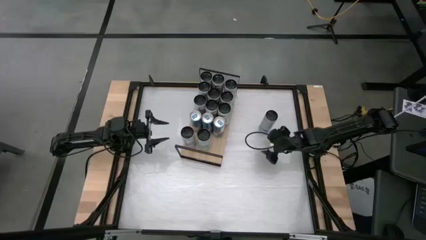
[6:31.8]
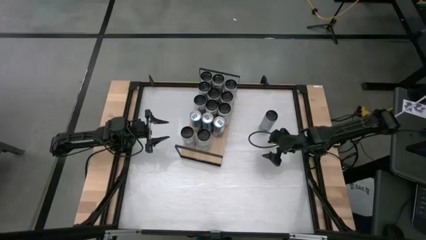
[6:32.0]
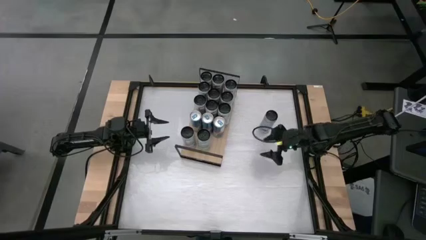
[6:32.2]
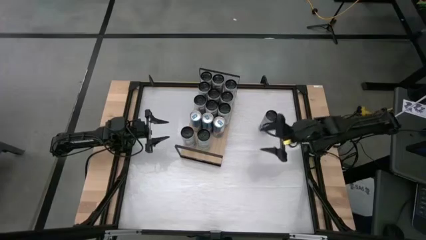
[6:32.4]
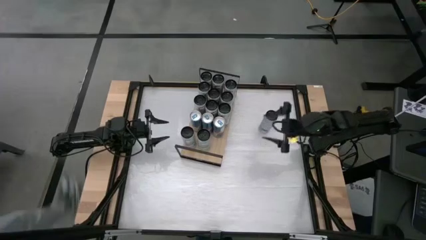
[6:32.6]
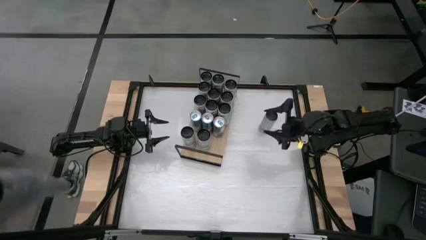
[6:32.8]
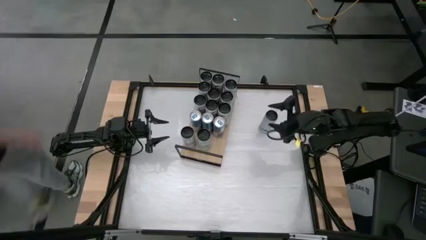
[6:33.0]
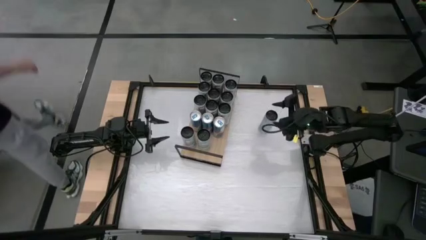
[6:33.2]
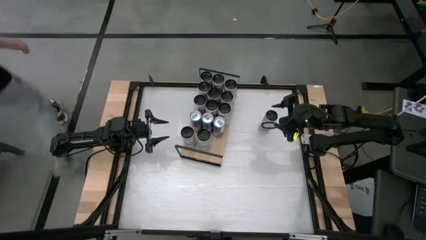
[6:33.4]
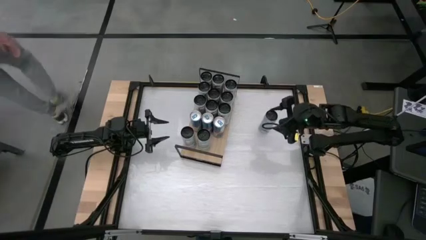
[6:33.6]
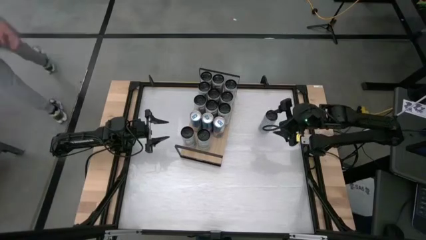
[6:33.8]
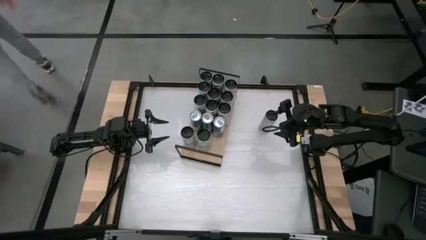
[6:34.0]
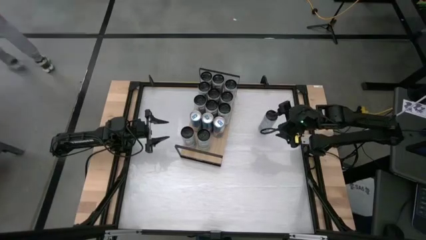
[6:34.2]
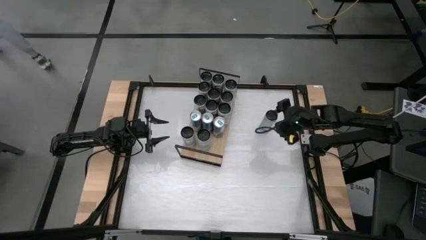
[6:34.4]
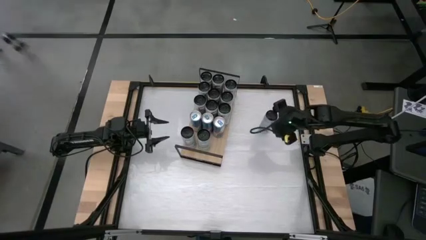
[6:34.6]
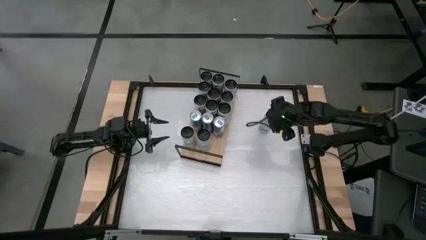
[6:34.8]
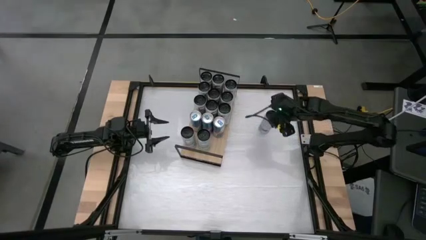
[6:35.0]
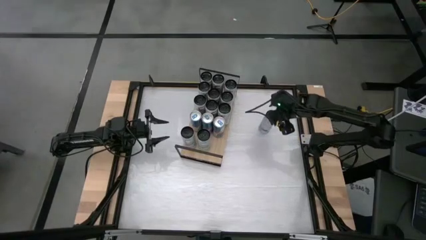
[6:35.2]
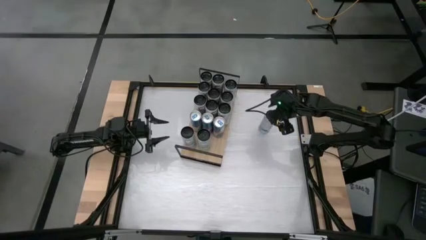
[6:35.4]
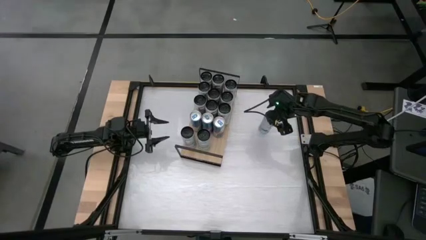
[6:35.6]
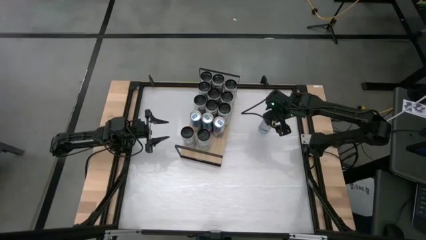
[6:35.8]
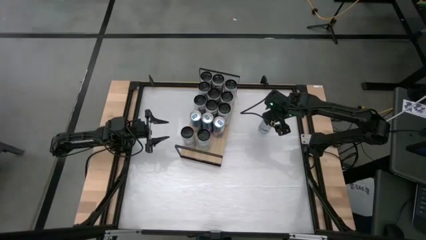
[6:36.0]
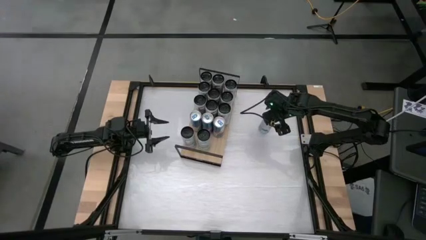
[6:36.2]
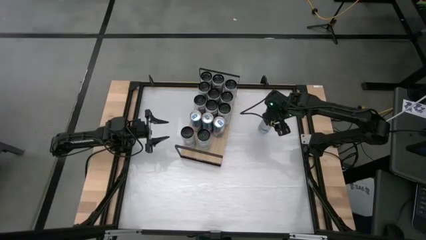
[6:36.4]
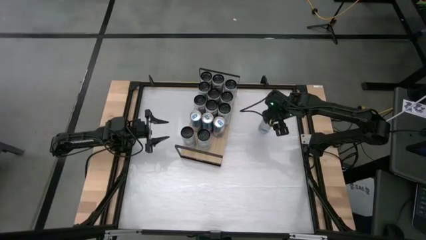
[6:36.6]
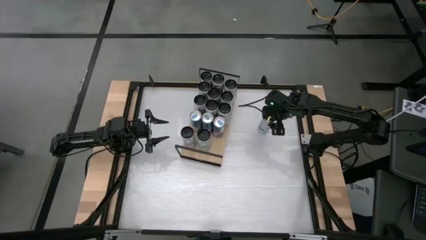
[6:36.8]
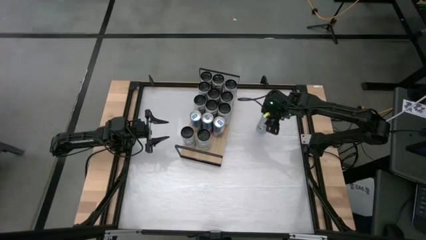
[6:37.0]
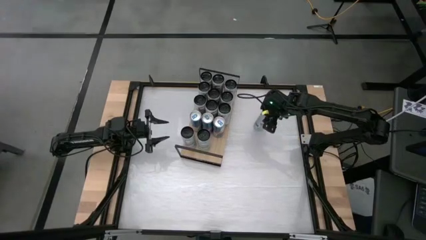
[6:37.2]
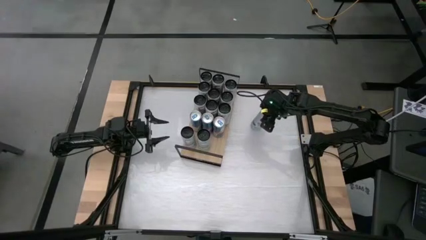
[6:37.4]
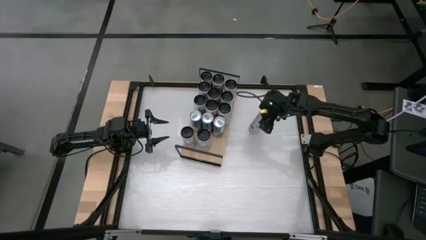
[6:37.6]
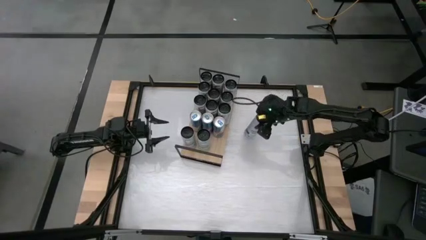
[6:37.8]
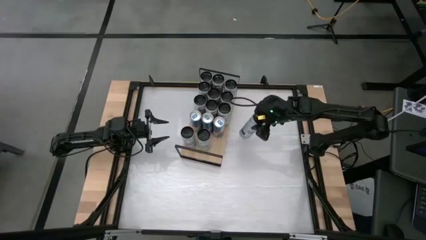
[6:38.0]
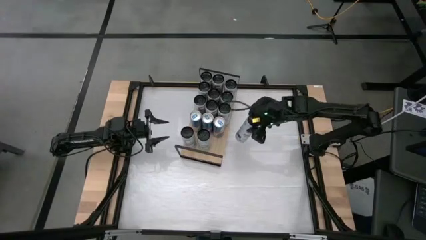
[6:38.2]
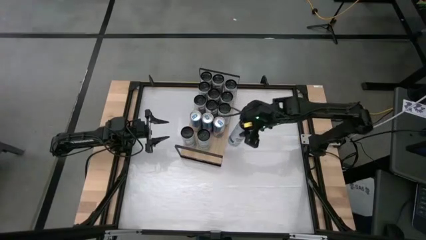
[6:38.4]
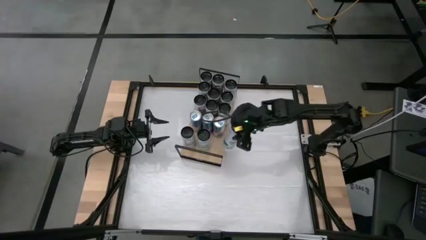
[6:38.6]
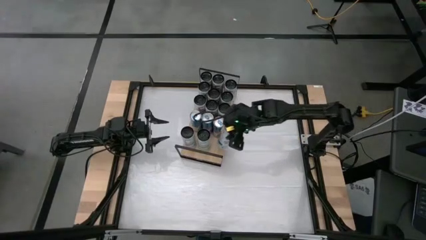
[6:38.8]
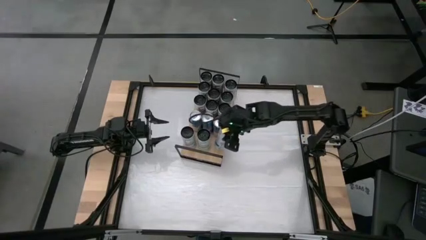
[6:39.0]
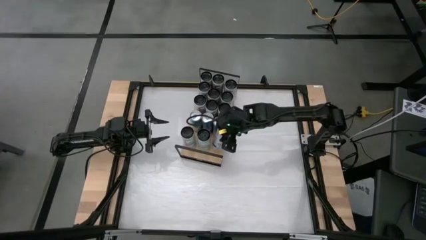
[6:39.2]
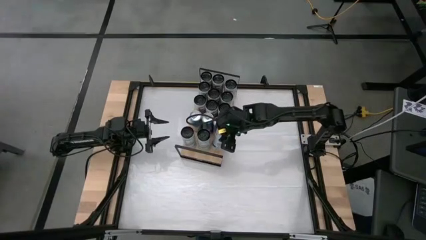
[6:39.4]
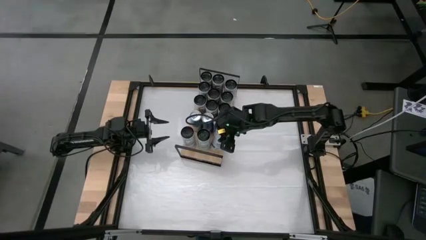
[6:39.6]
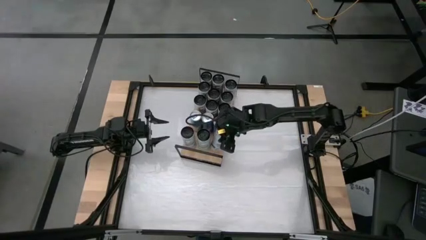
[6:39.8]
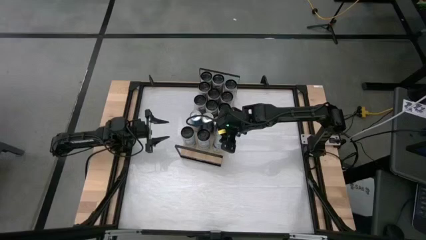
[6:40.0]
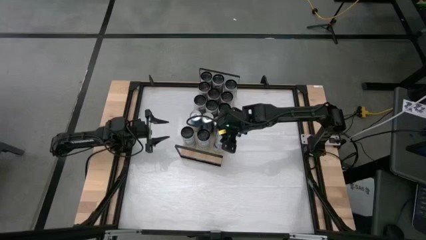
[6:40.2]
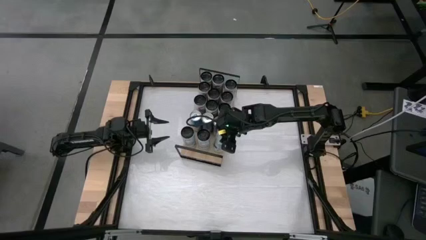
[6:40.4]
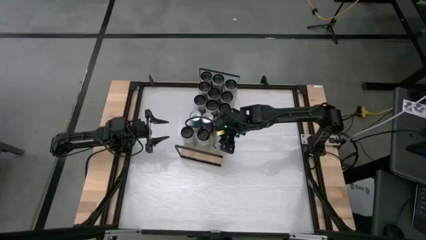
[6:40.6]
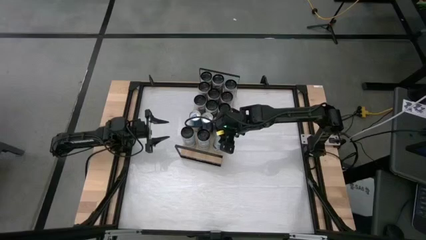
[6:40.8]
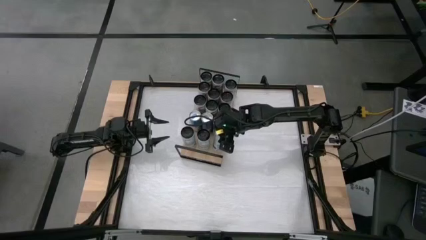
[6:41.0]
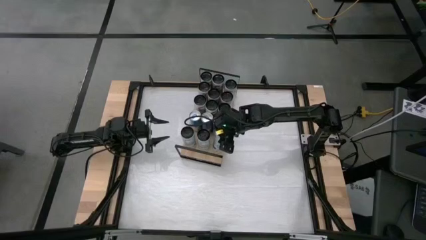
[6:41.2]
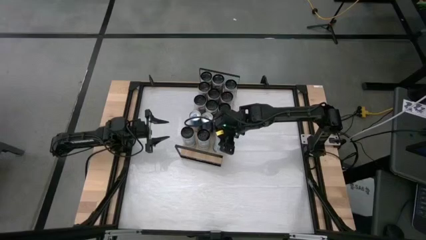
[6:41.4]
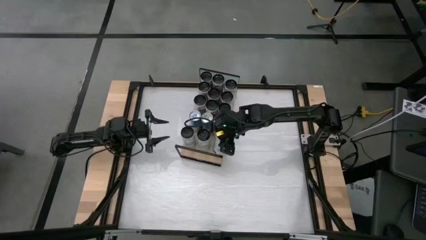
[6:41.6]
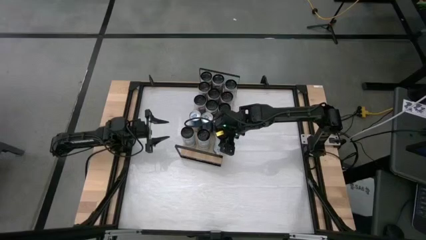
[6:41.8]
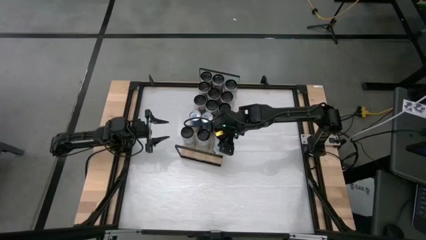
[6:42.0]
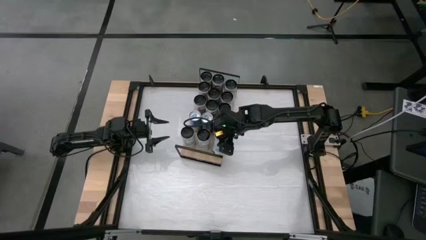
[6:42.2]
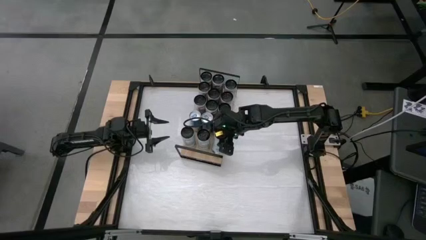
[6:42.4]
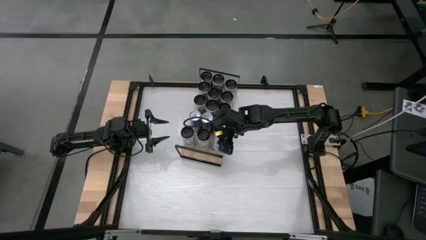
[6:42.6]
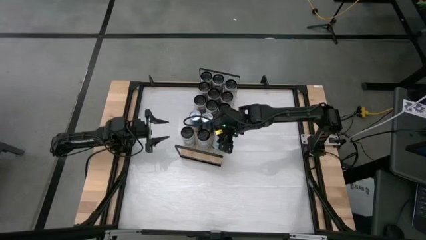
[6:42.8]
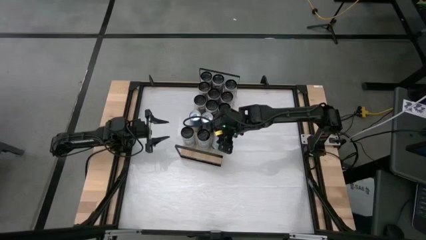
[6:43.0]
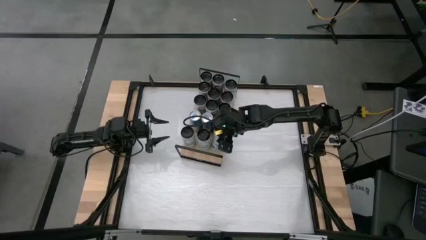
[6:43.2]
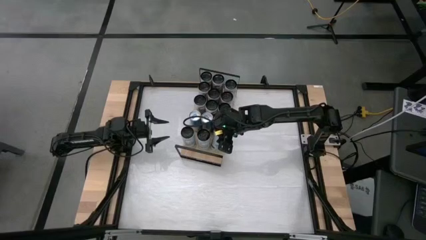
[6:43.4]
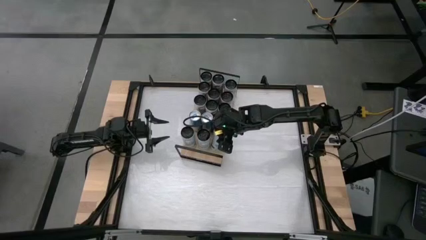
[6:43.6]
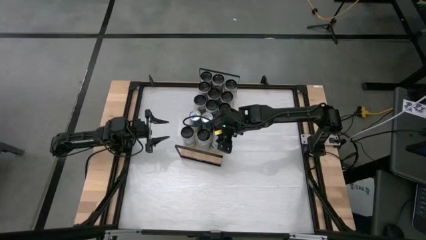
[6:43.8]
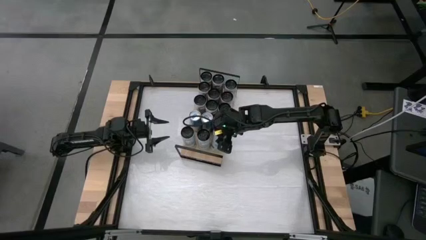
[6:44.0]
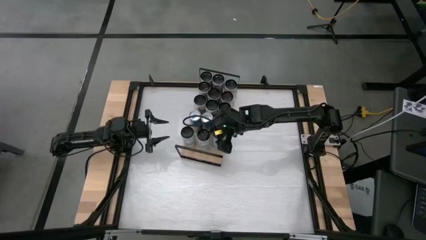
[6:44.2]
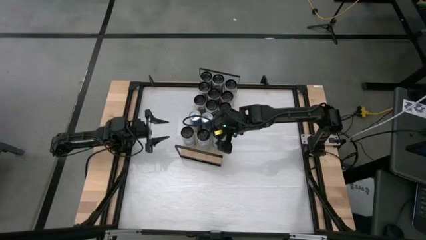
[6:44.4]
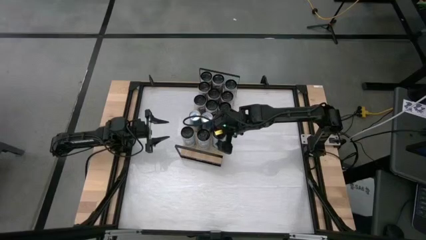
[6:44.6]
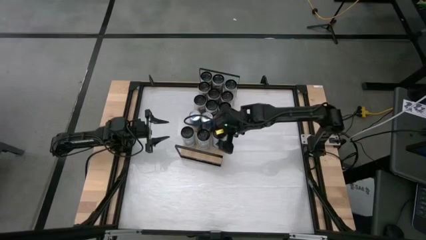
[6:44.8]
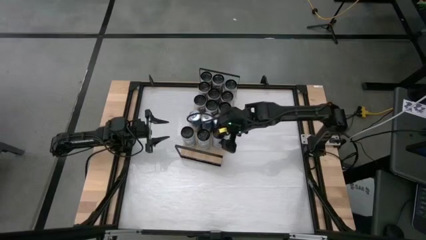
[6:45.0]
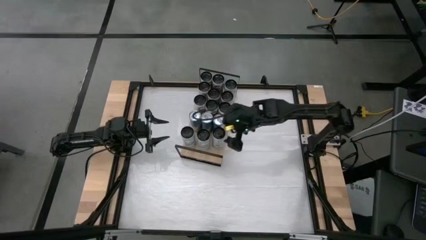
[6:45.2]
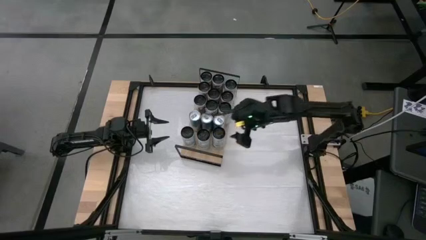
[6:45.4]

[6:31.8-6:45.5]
Task: Place canned beverage on shelf
Put the blue soda can on the shelf aligned with the other blue soda can
